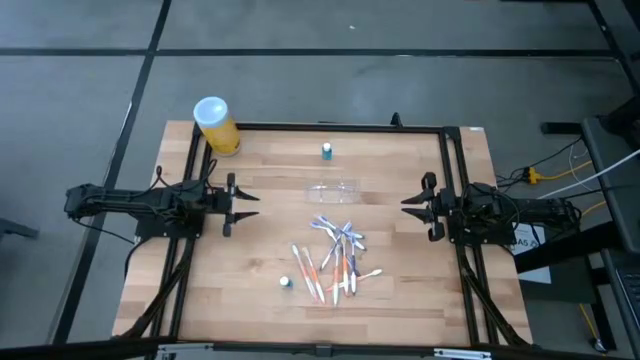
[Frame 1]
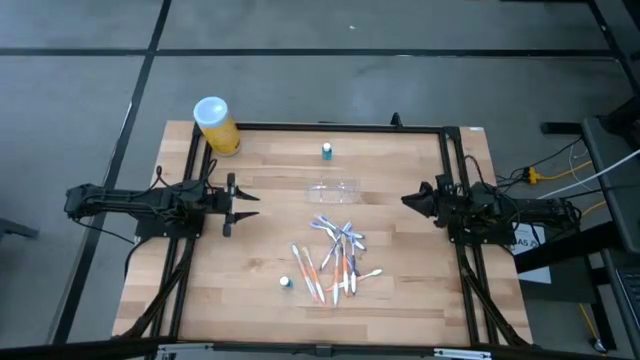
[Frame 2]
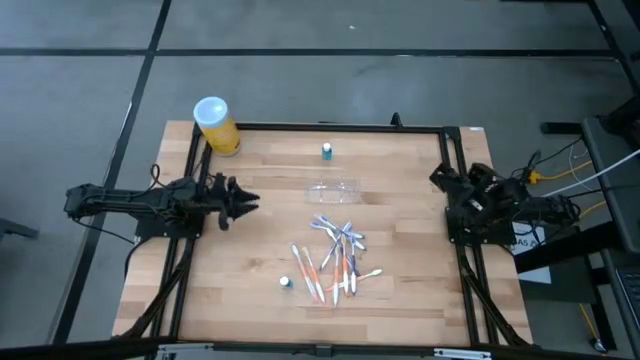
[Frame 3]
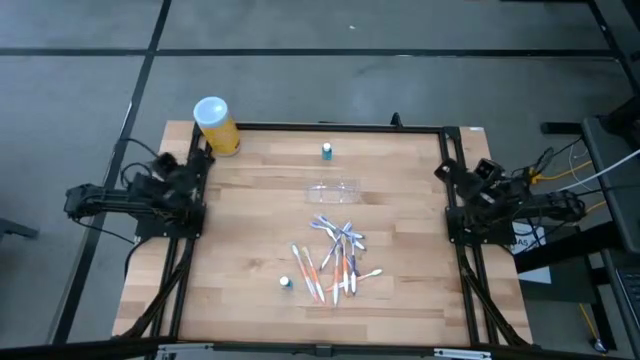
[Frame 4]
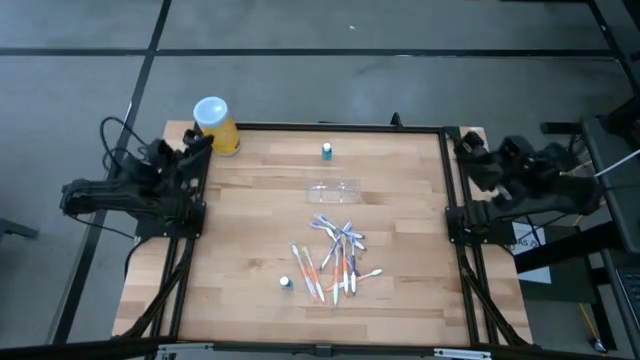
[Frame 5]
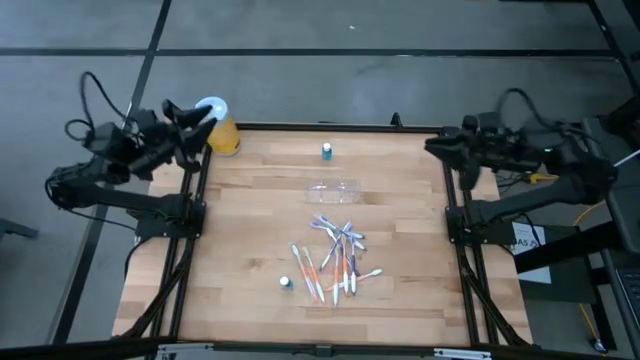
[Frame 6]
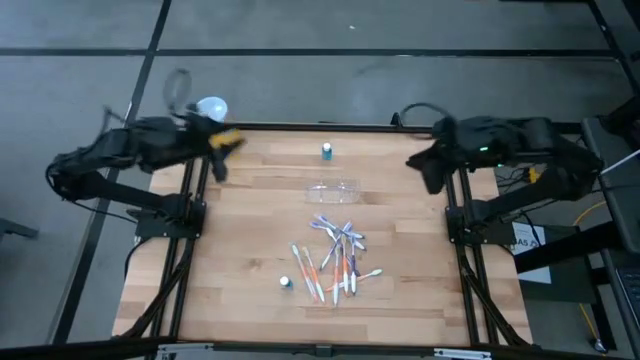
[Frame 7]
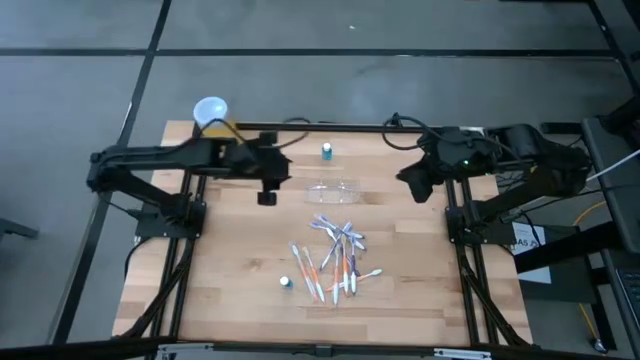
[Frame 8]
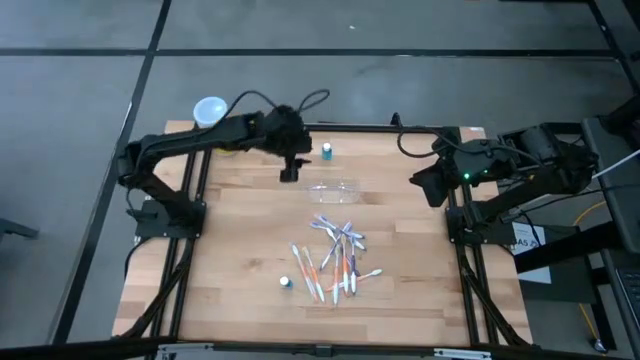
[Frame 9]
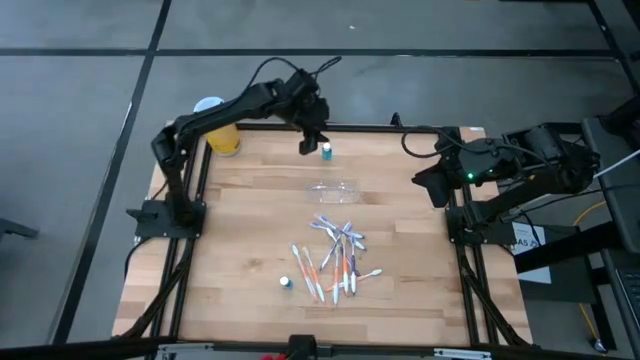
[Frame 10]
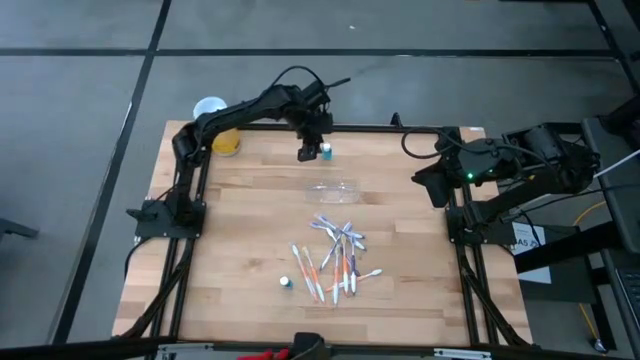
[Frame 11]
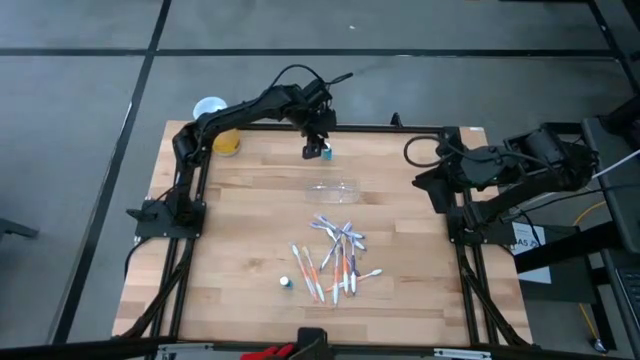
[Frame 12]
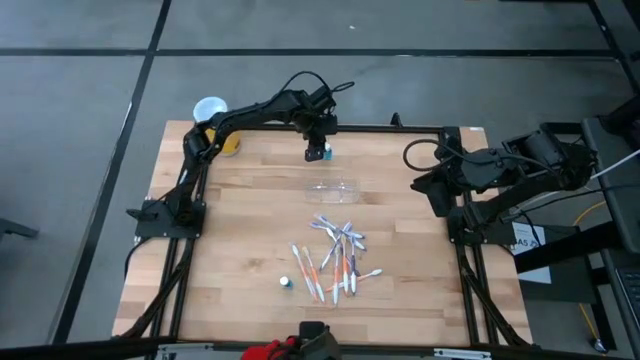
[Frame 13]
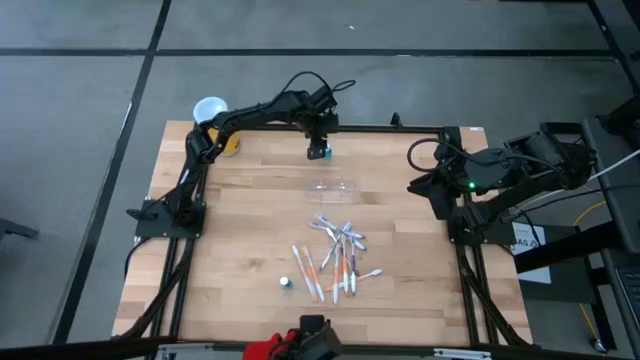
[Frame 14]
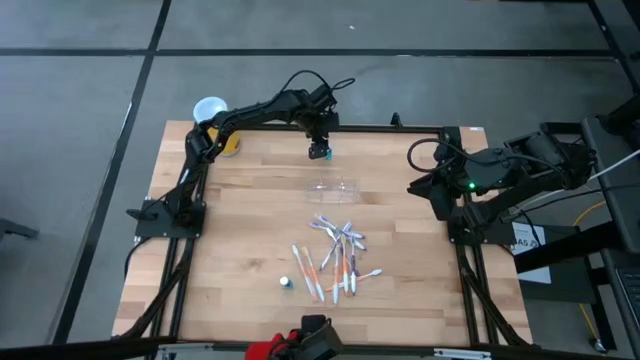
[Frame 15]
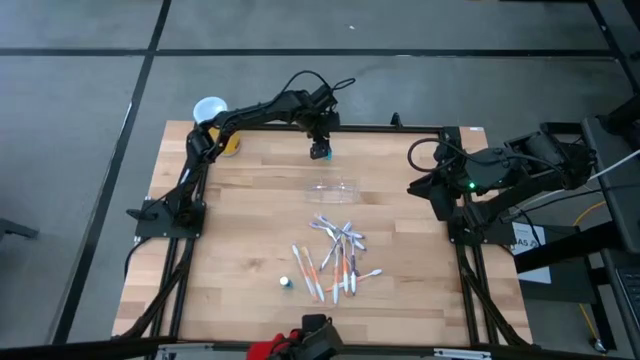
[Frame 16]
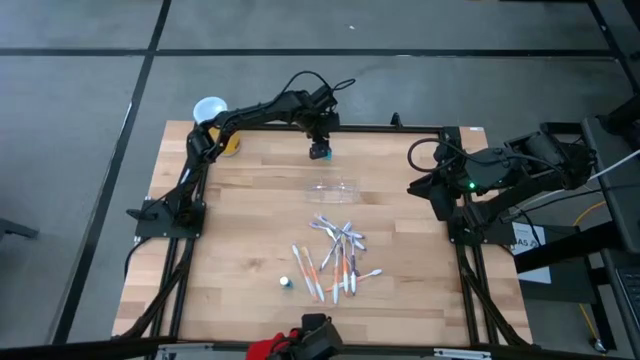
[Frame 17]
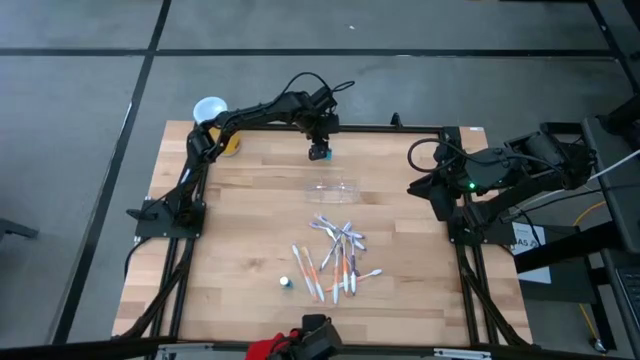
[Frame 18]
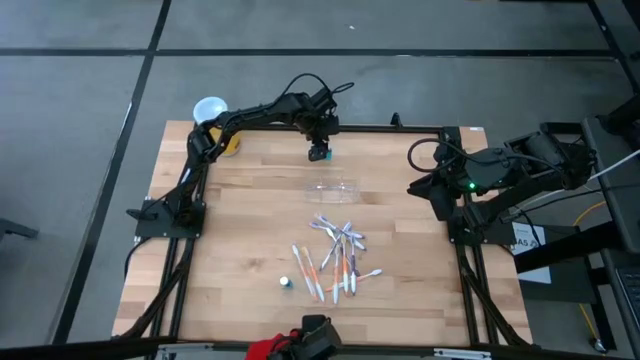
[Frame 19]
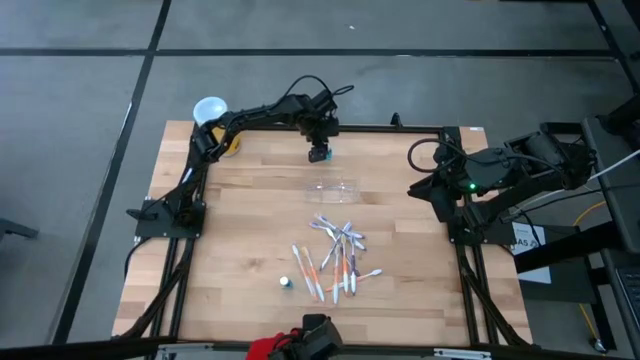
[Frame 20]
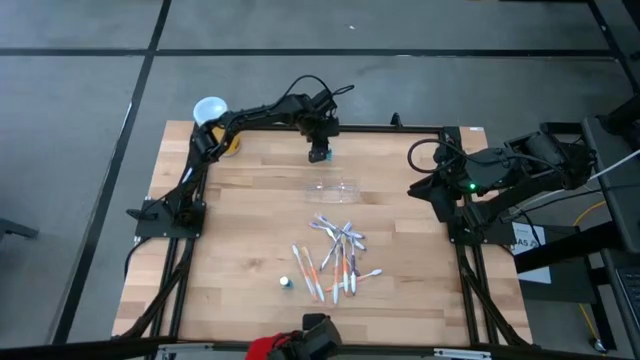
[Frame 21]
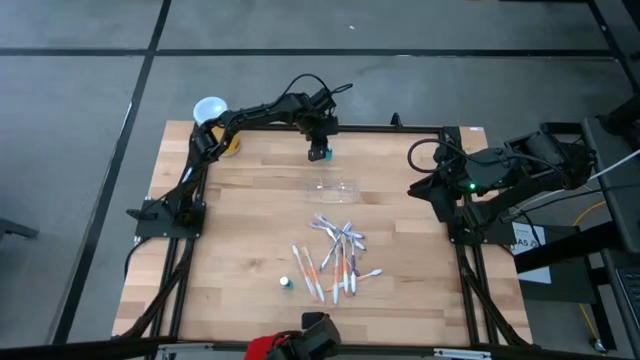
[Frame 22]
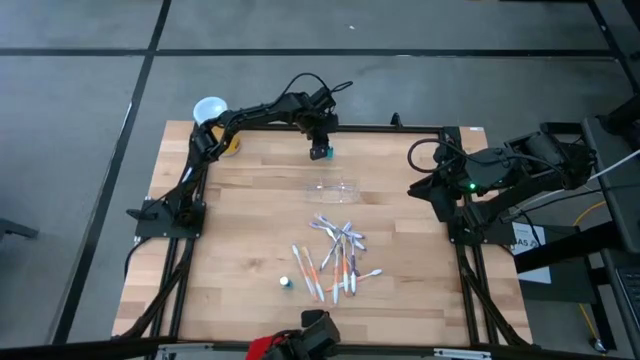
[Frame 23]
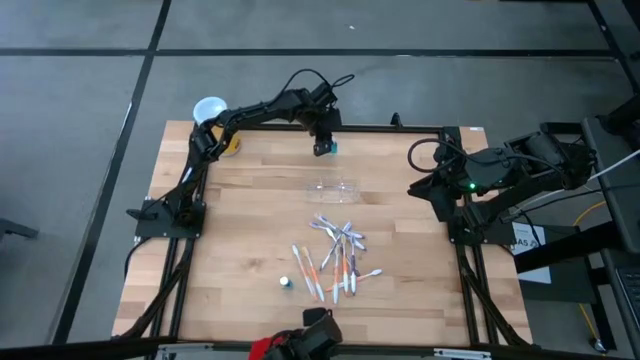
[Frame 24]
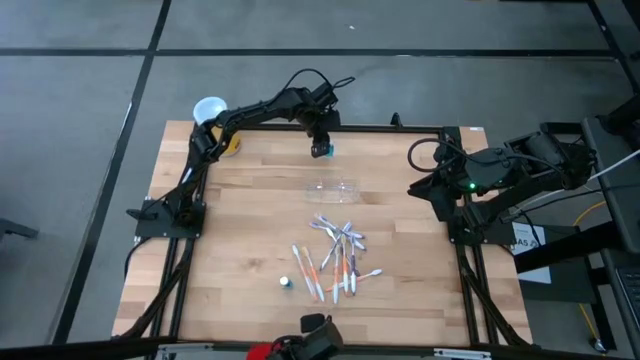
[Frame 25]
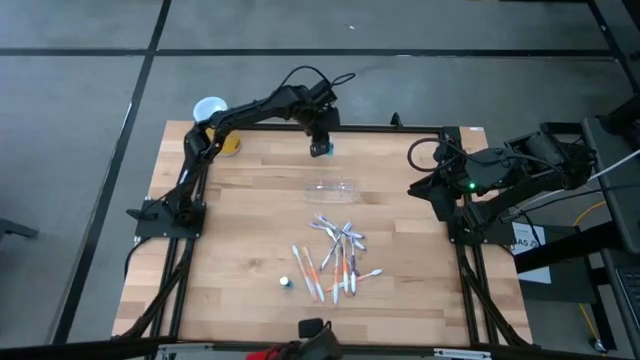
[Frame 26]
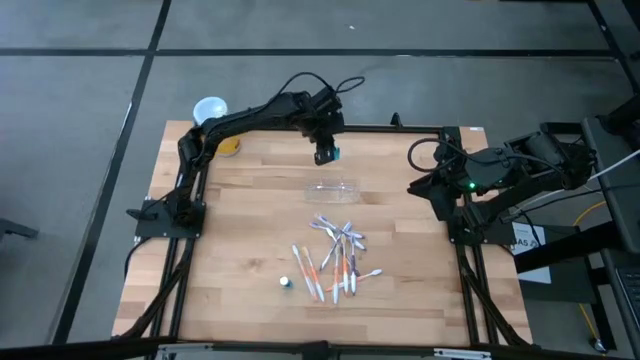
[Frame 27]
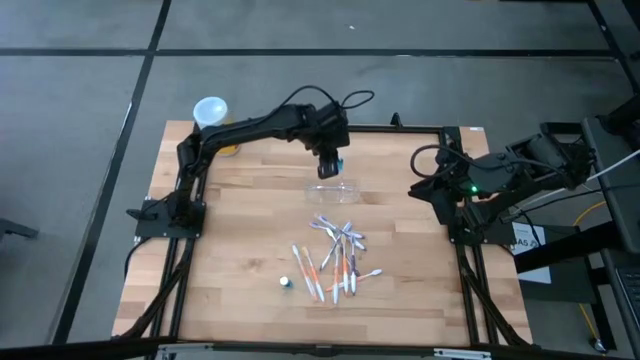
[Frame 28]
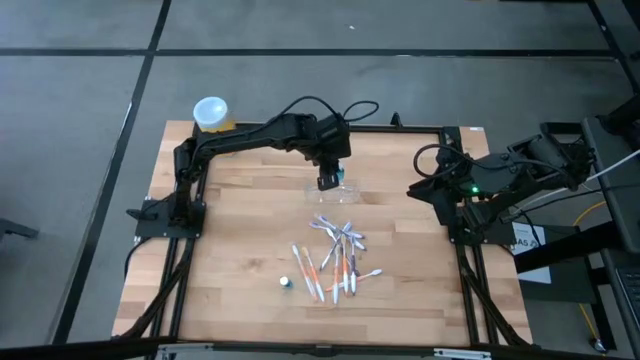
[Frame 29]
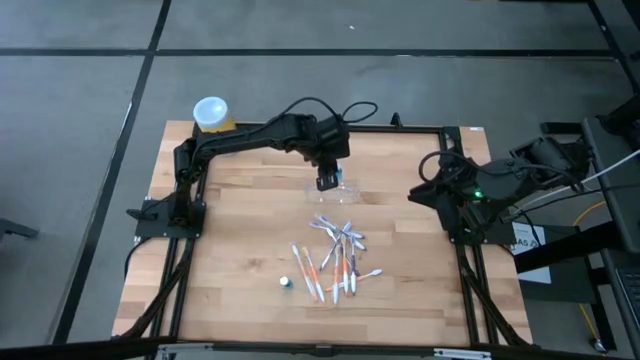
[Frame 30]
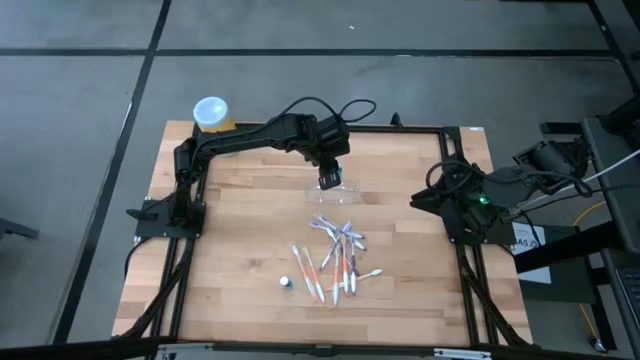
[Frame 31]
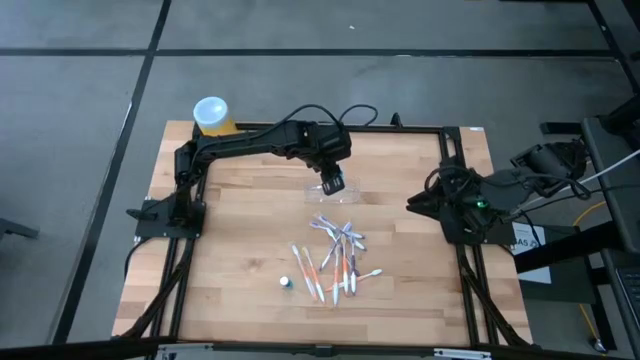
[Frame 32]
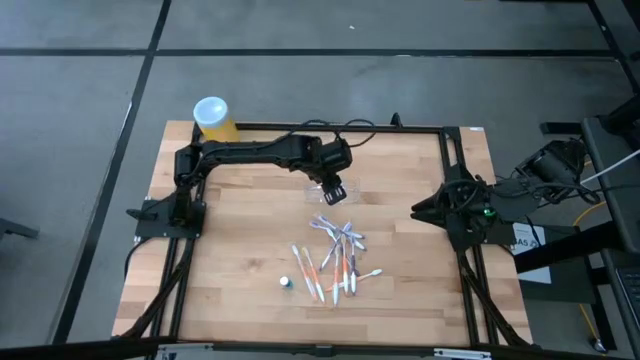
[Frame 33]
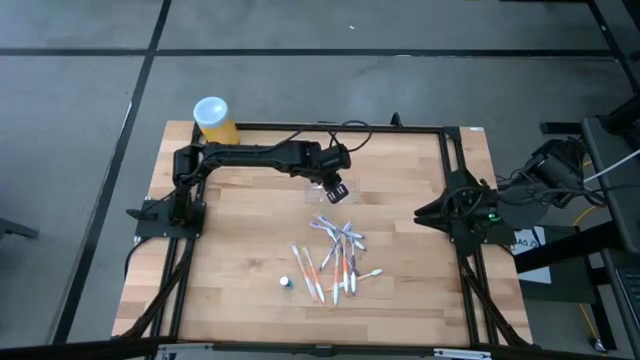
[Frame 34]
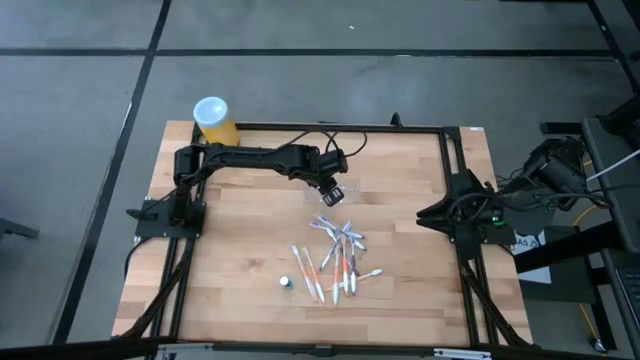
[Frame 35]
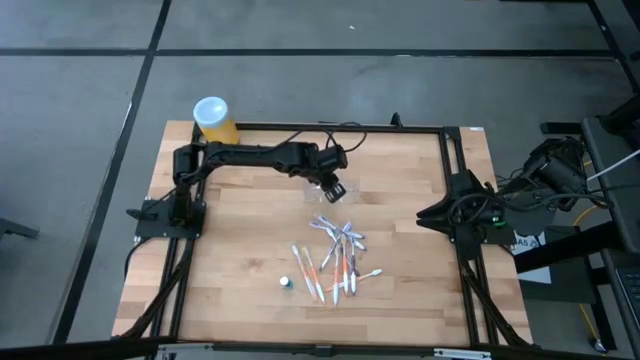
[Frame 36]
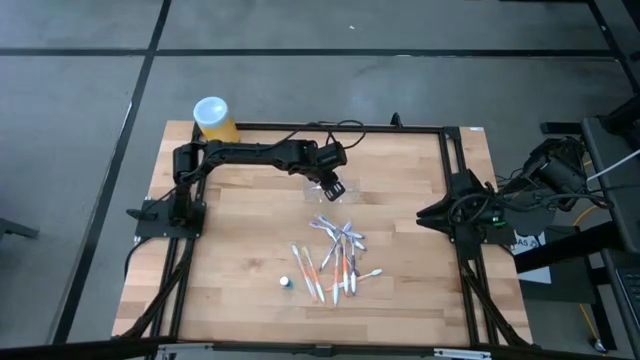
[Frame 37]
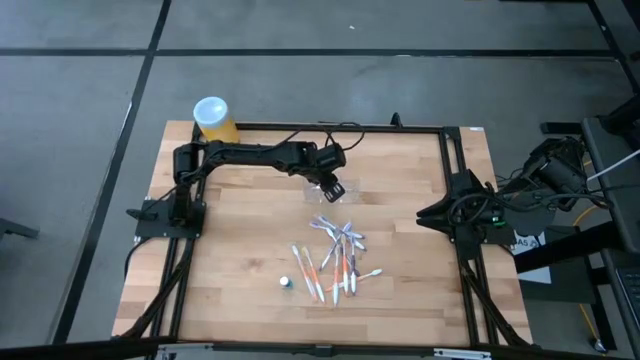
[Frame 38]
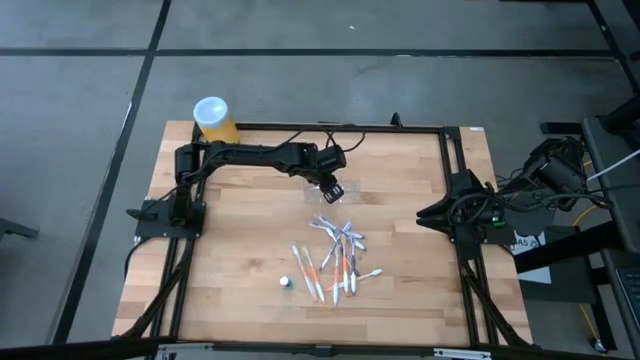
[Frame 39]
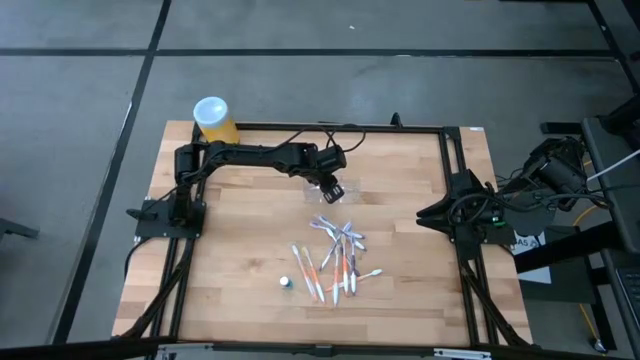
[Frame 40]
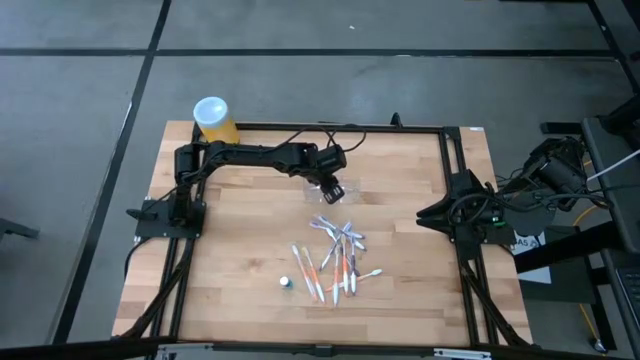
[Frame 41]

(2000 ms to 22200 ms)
Task: Pick & Place toothbrushing station
Put the mouthwash into the transparent organizer
